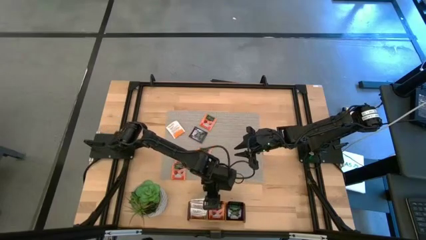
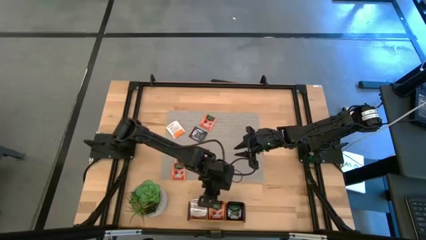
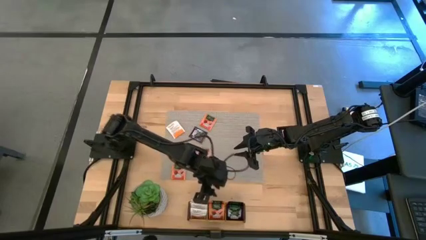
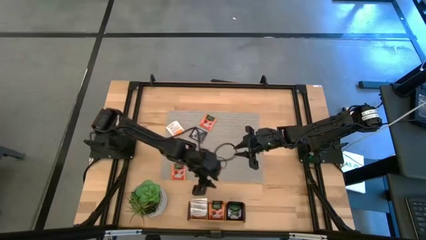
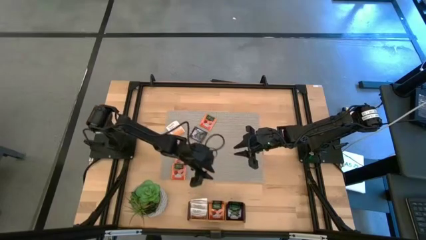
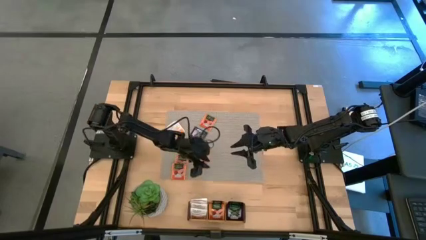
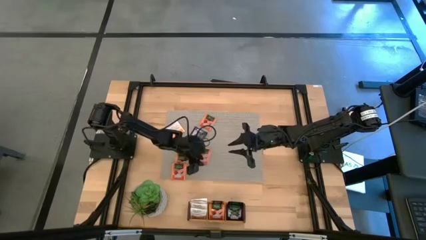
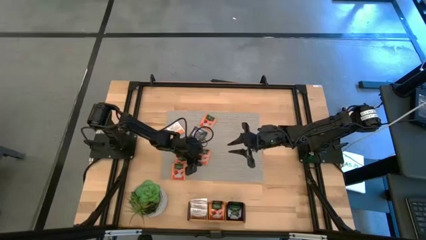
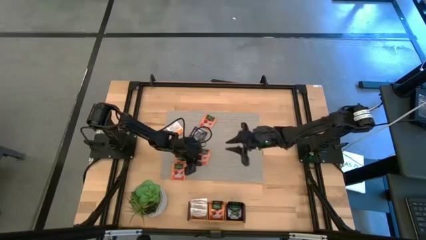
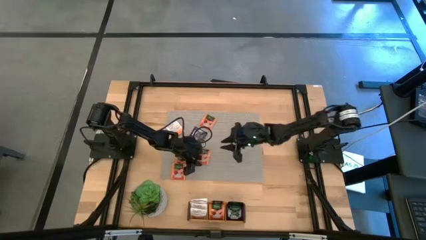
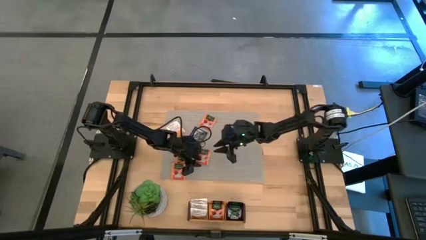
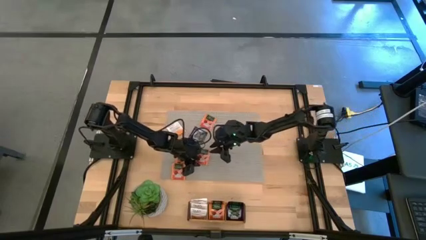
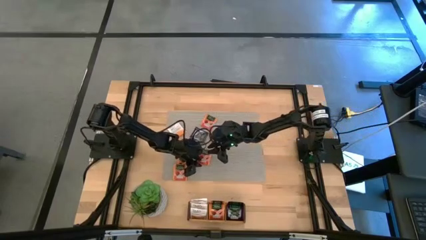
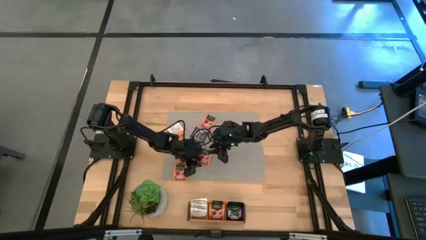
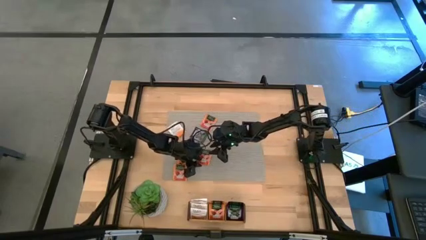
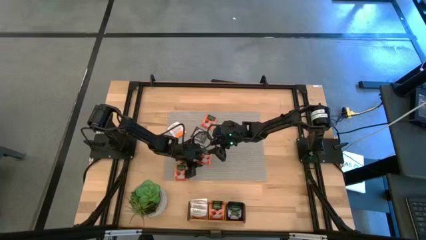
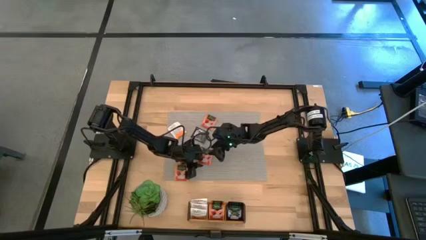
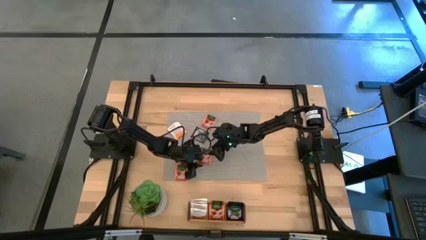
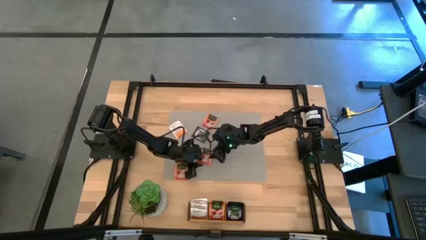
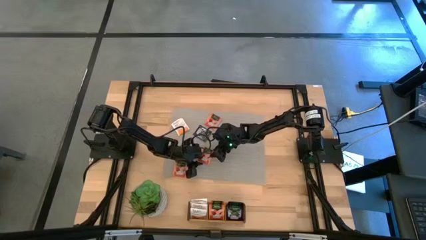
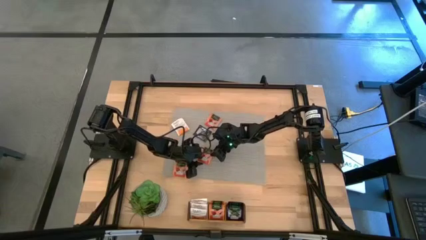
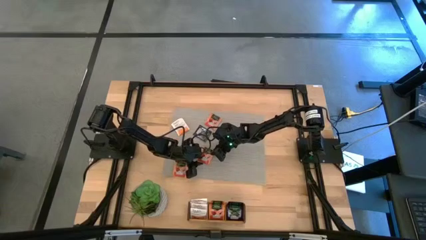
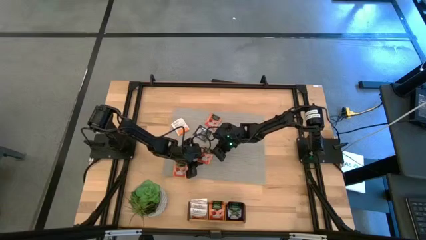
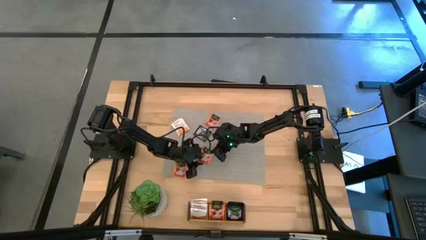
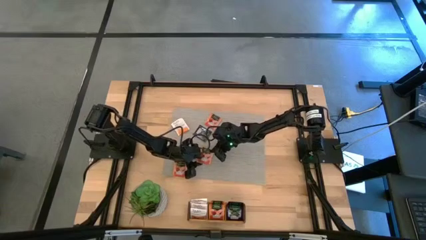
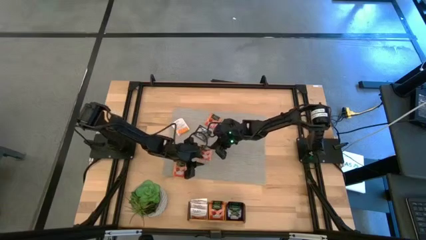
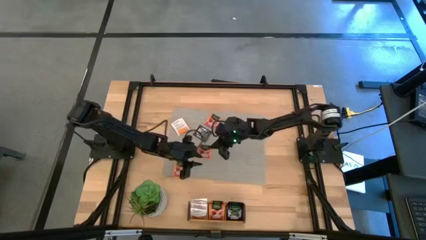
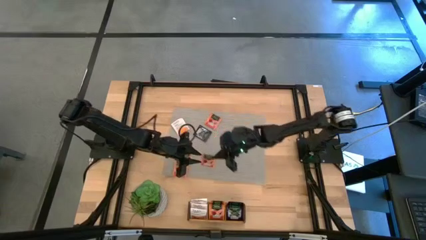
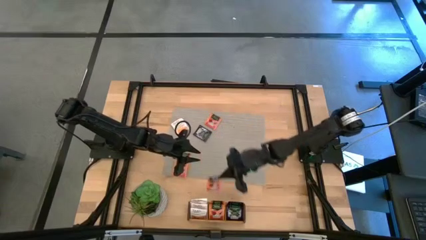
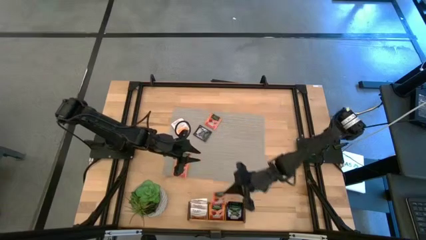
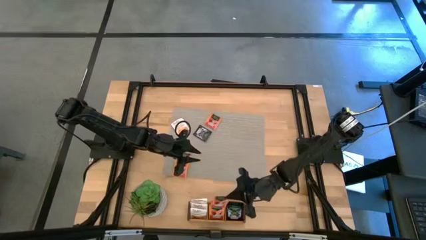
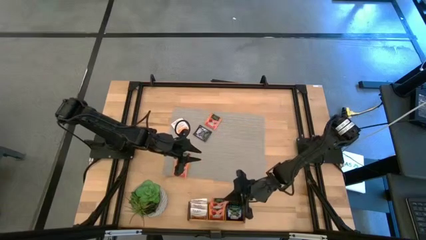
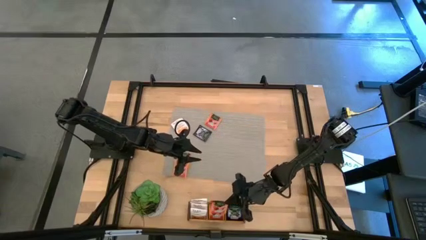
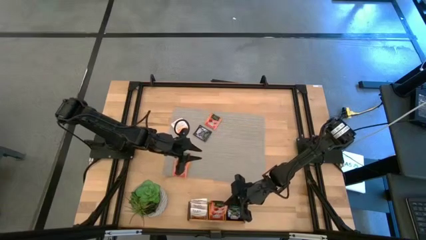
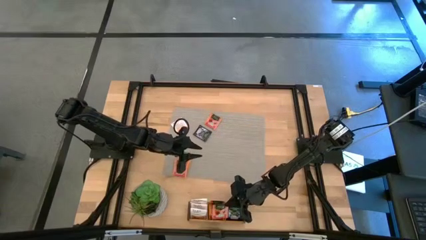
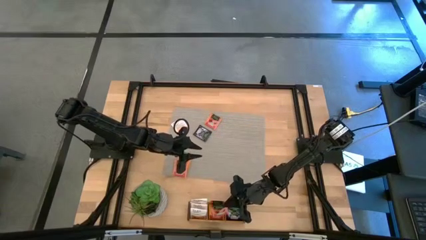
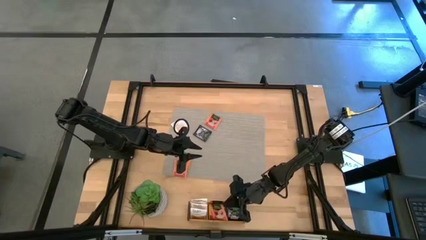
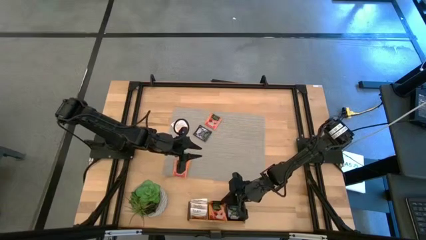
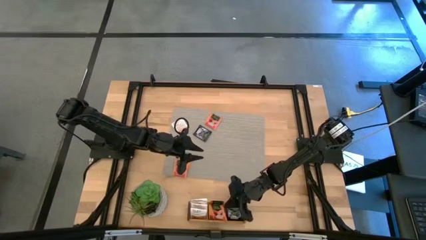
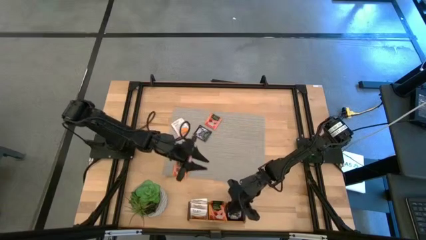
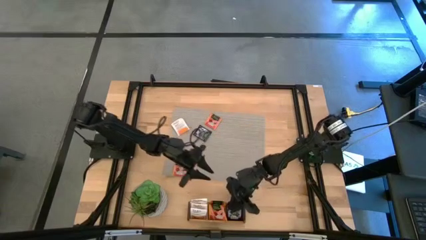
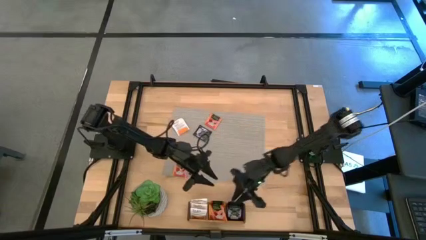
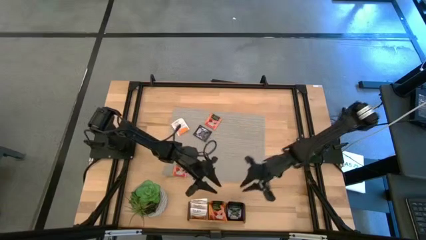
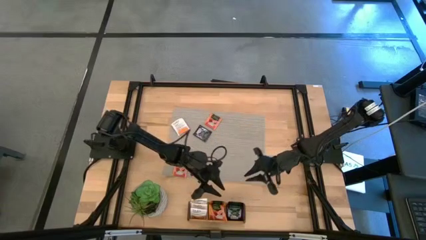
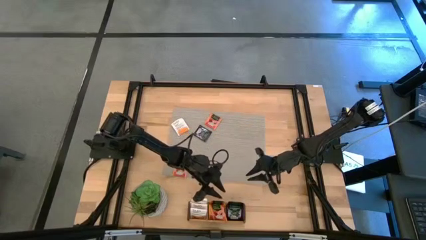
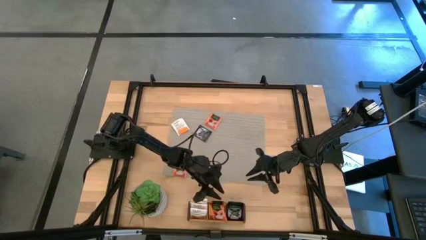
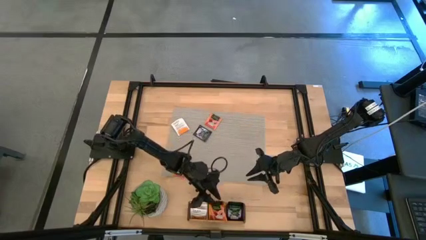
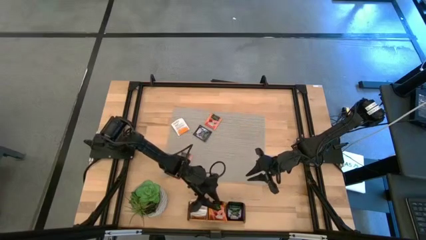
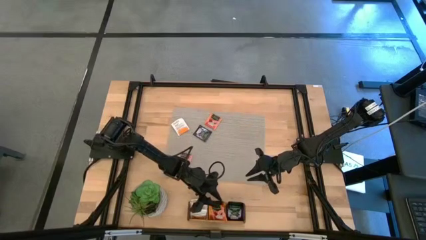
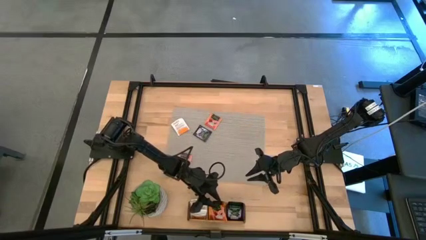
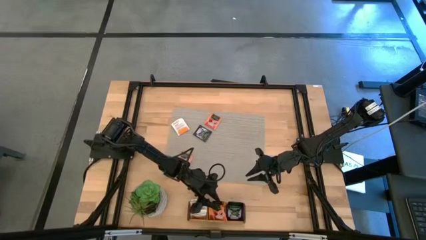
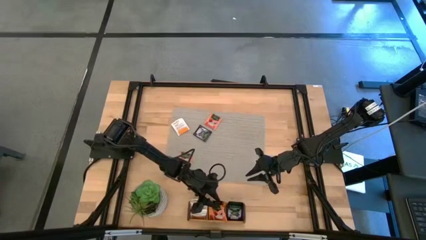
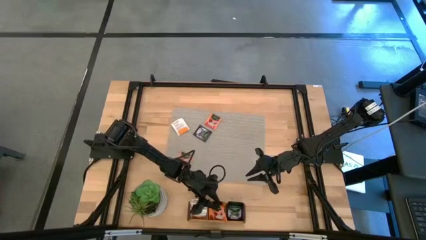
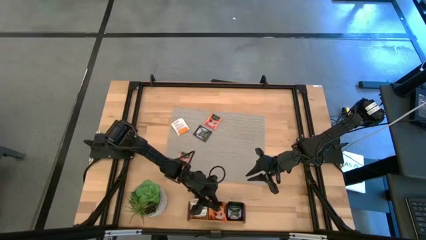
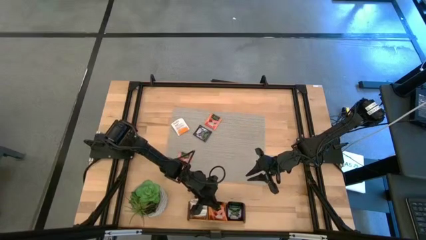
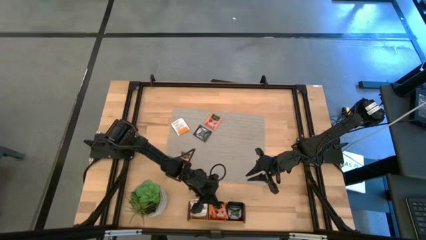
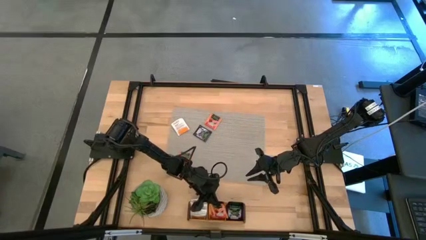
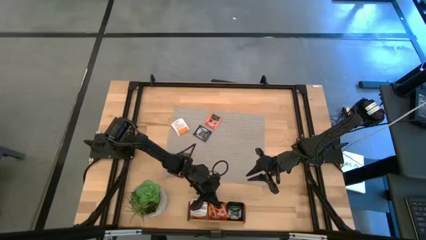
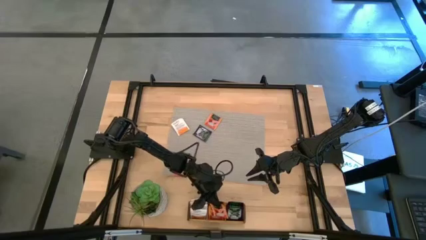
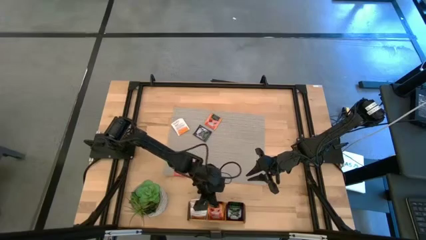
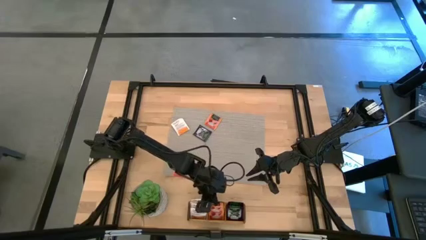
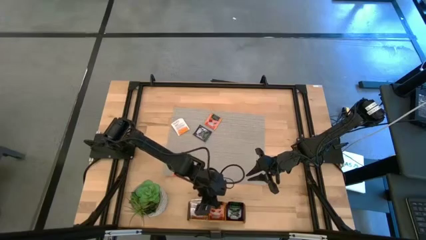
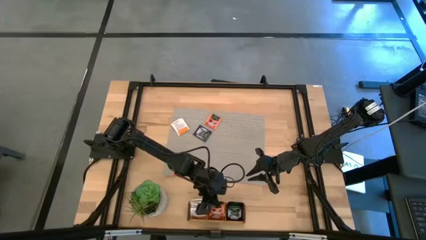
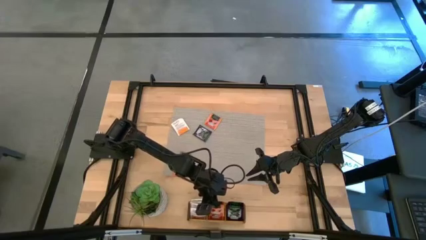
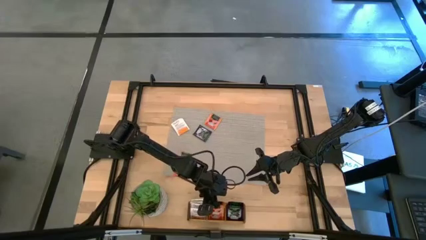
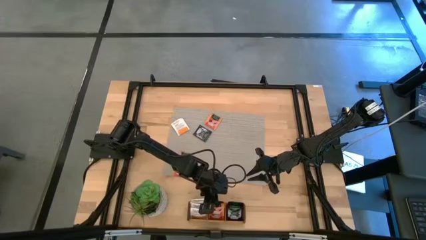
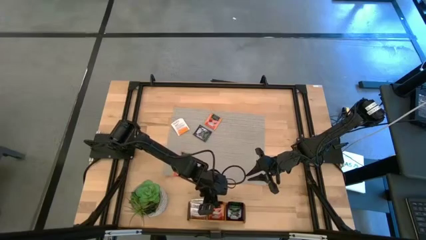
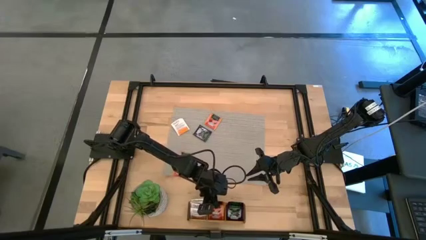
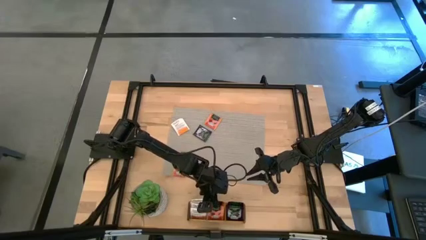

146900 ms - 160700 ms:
Task: Pick & Place Tea
Put the orange tea bag into the middle section of the wooden organizer

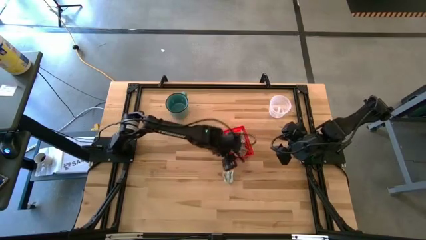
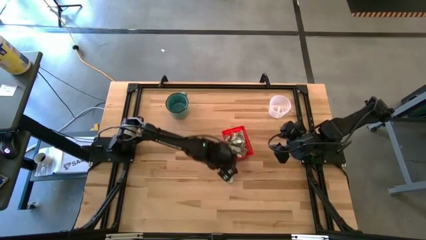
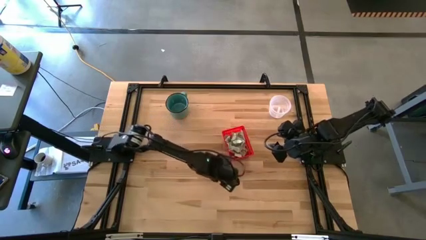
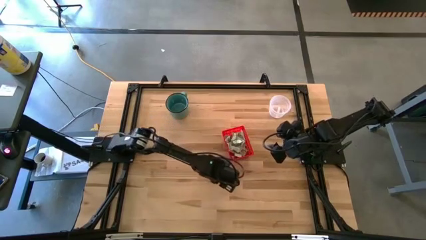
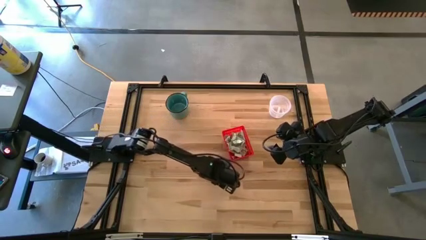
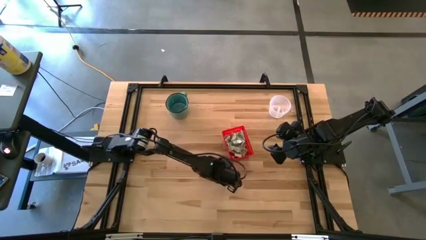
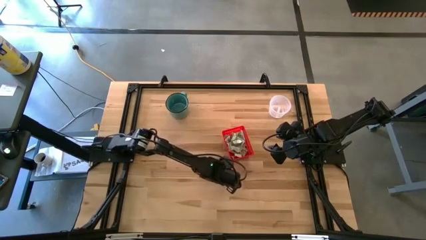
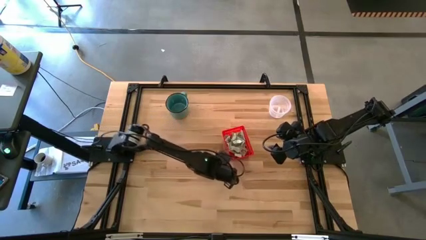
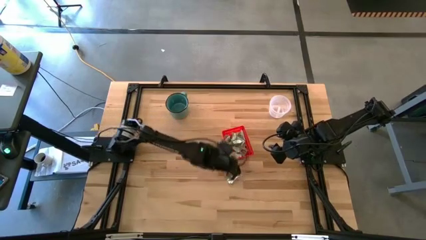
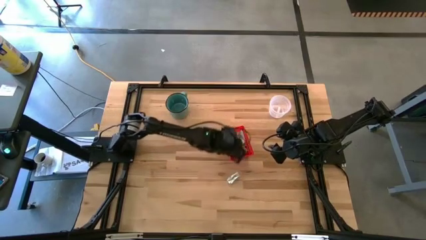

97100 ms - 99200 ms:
Task: Pick and place items into bin
Put the stevia packet into the orange bin

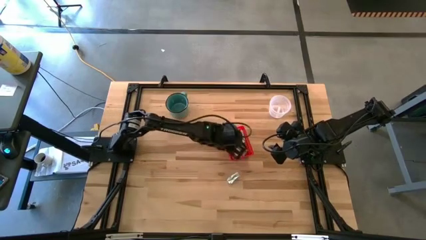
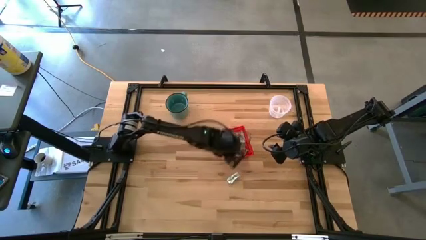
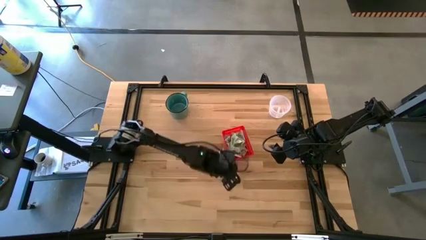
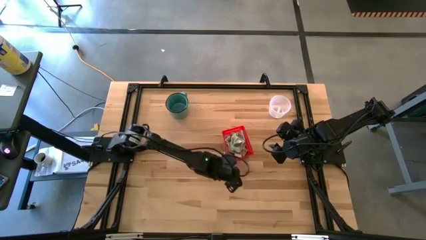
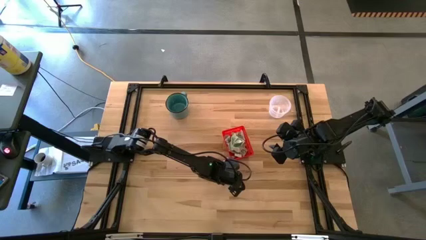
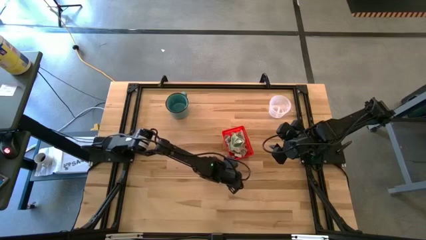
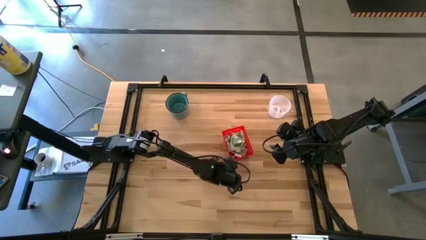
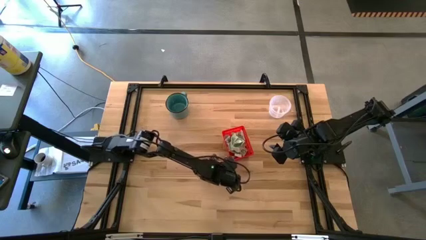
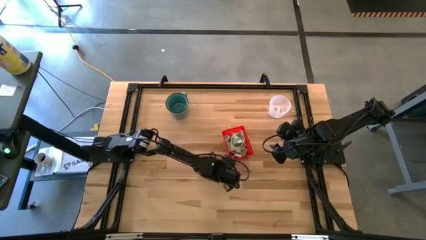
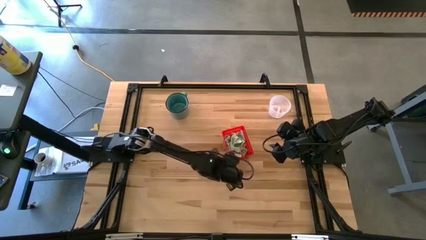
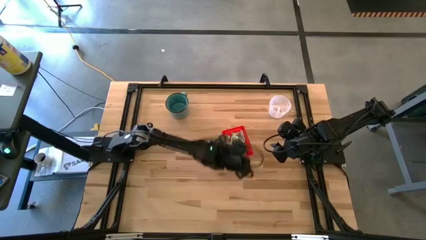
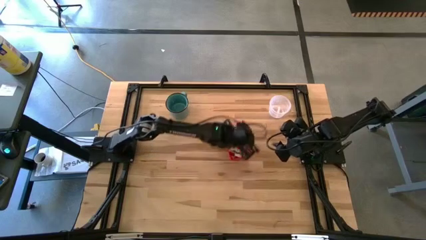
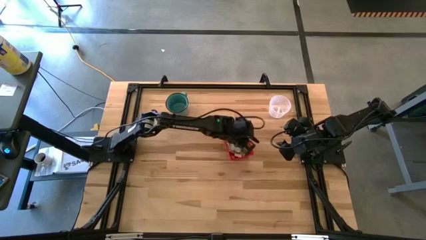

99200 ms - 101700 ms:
Put the stevia packet into the orange bin
